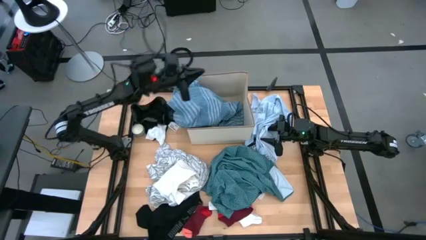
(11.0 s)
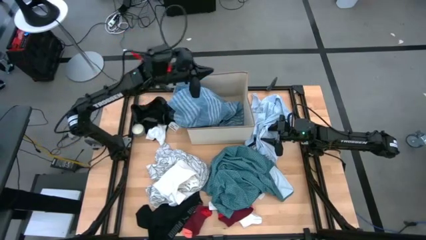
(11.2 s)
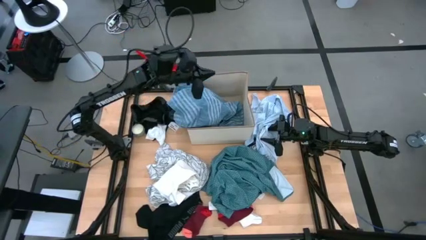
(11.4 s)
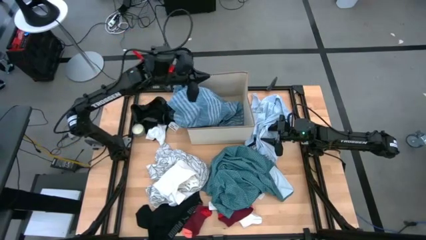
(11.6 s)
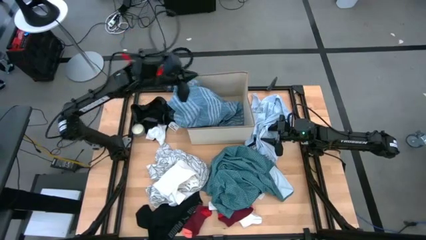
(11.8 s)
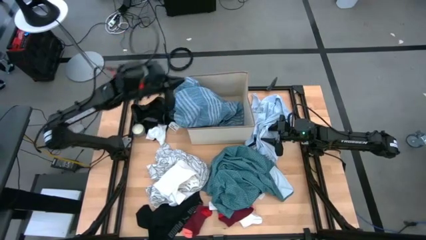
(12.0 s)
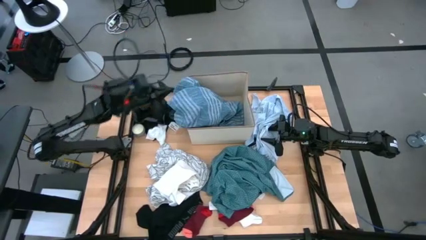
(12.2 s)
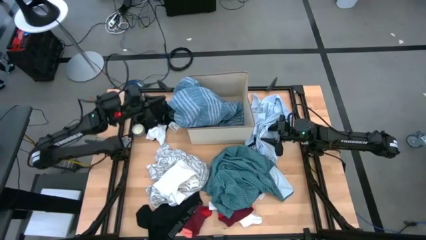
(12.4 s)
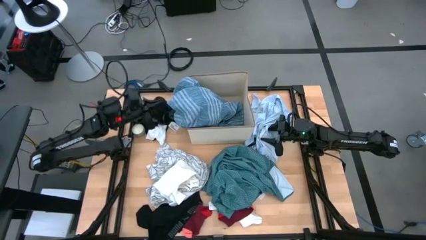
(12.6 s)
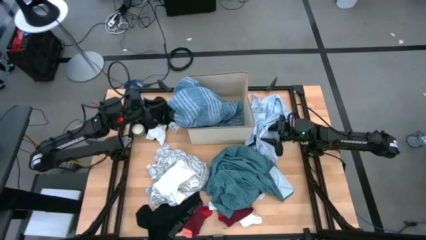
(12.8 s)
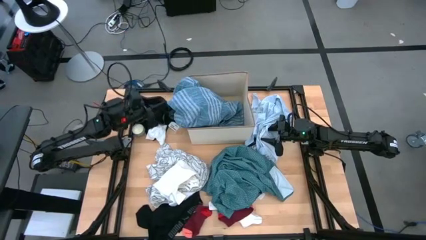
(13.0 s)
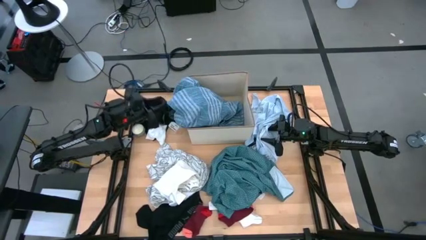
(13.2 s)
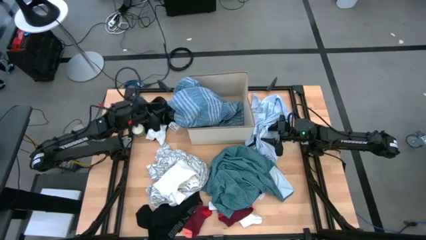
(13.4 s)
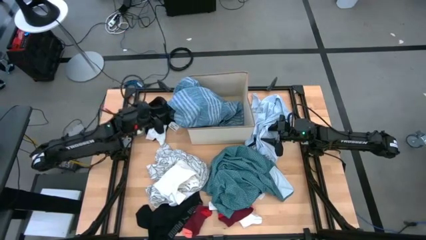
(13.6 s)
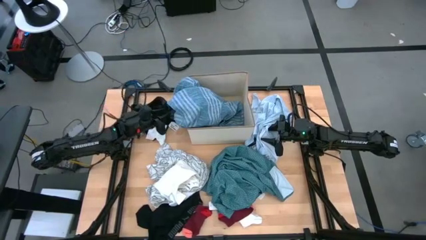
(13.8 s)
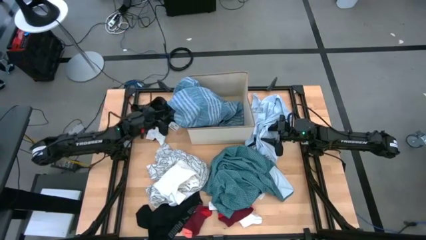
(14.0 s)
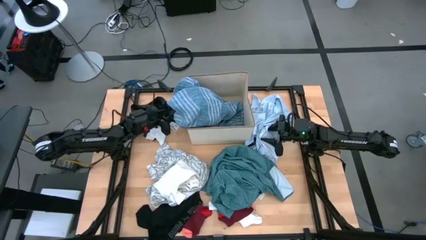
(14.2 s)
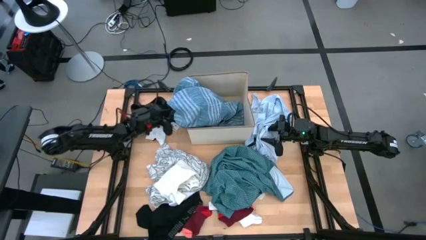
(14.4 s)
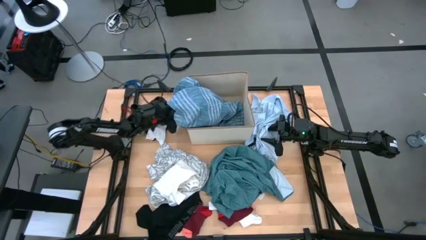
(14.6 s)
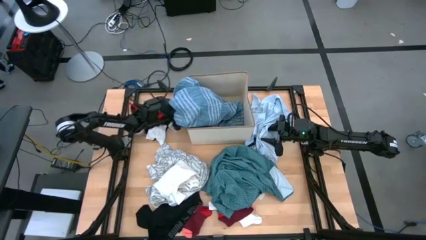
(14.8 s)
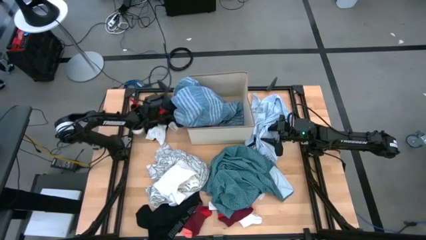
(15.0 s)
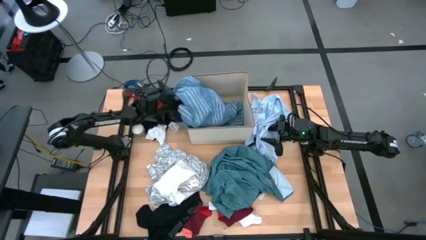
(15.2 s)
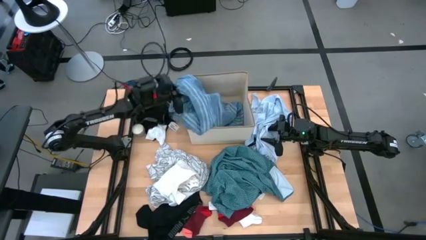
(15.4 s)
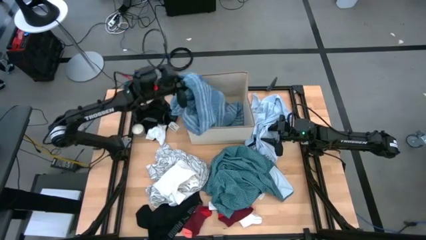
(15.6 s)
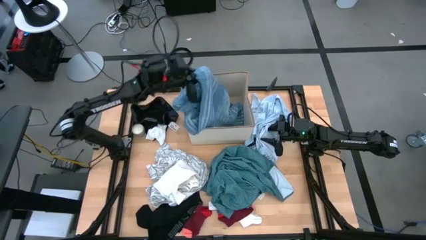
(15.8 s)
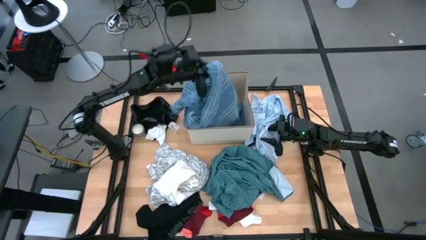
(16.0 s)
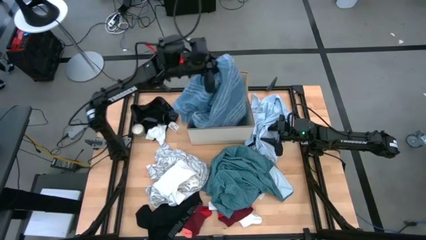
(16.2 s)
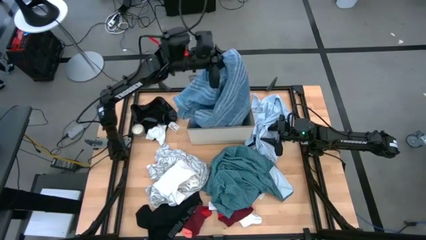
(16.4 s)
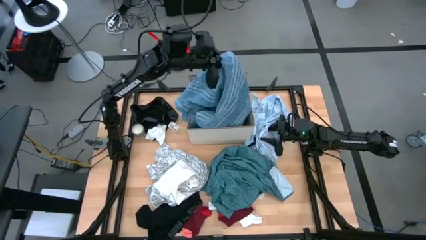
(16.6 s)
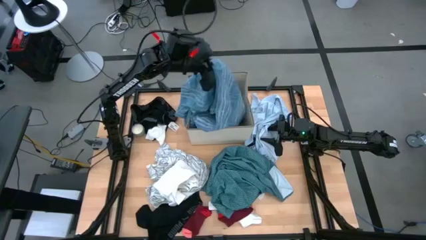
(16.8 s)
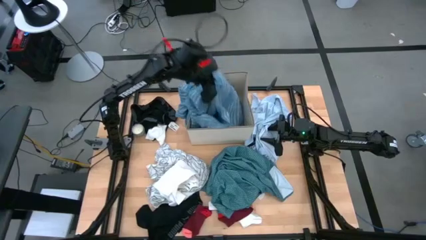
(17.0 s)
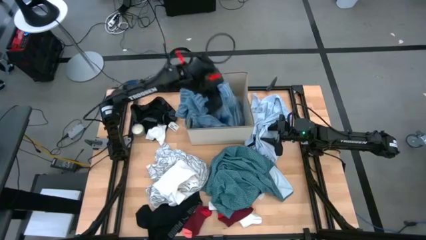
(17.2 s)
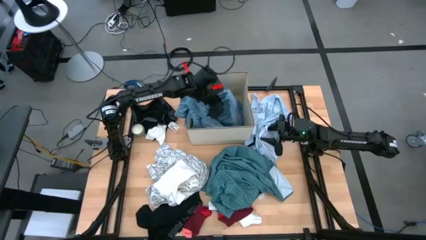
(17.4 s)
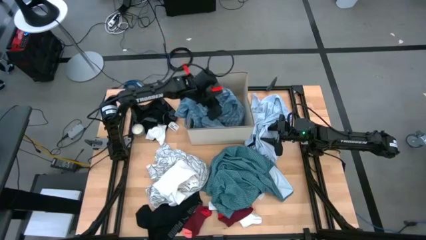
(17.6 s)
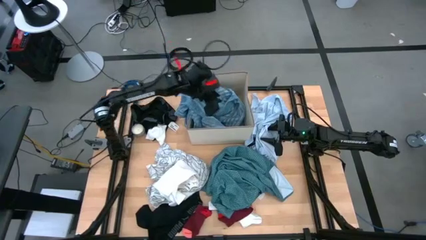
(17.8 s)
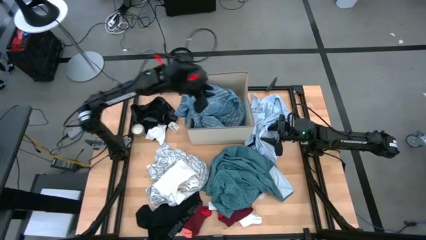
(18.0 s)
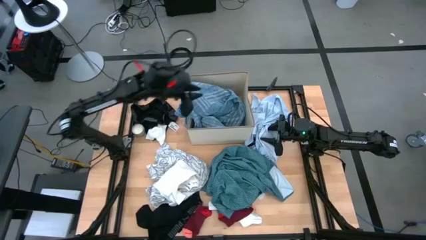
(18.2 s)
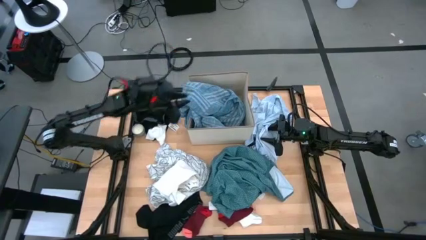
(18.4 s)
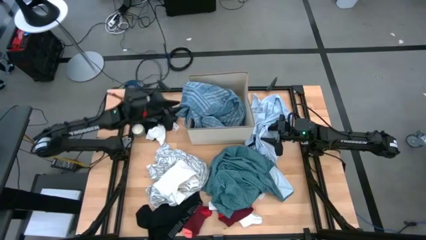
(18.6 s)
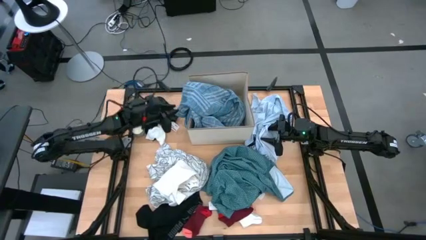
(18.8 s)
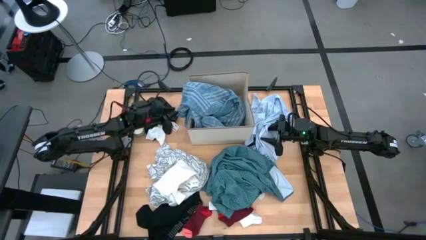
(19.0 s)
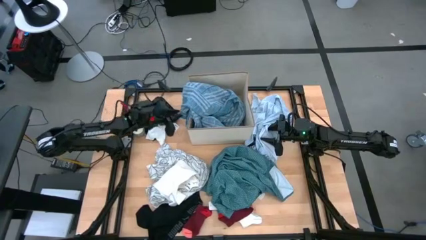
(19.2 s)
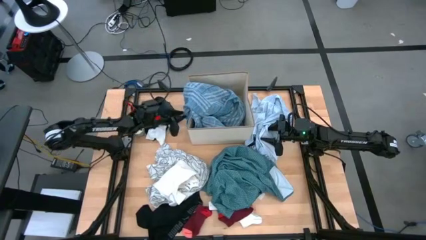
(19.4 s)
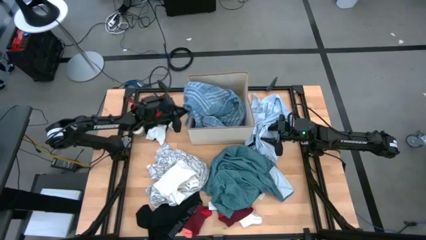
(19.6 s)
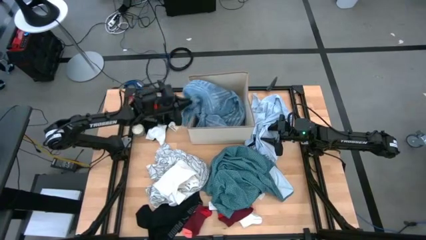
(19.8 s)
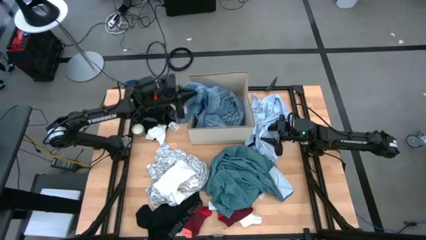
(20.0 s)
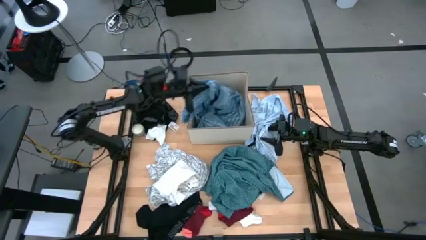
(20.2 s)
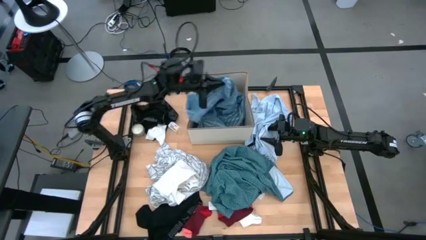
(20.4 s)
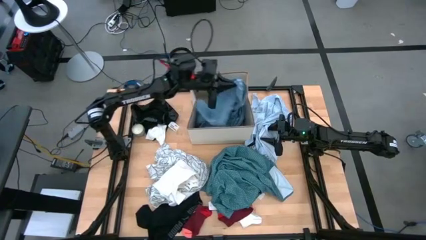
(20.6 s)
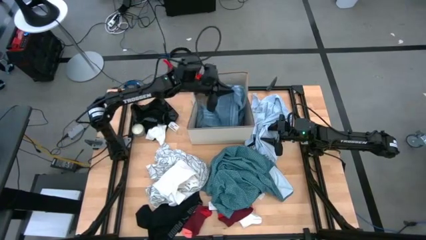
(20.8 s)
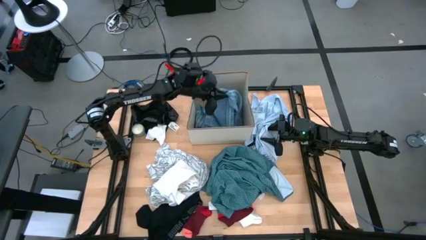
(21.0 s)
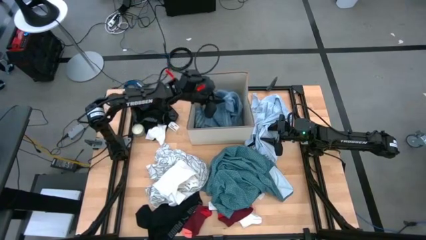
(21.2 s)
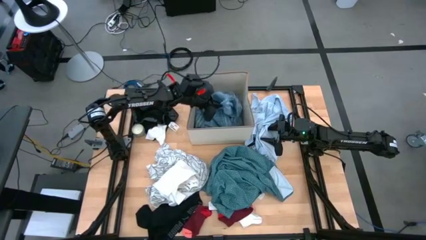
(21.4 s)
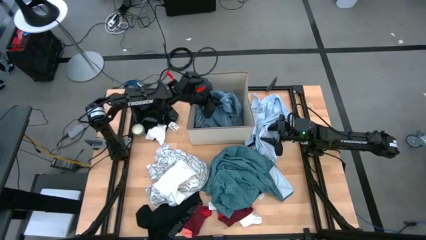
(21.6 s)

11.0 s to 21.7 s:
Task: Sort clothes
Put the dark blue shirt into the laundry organizer

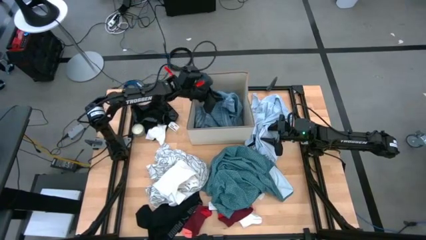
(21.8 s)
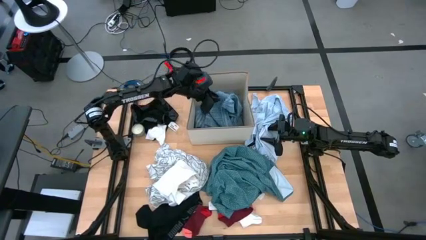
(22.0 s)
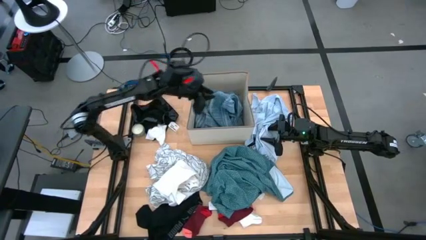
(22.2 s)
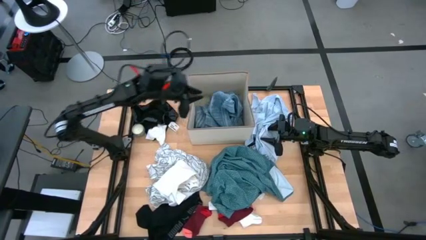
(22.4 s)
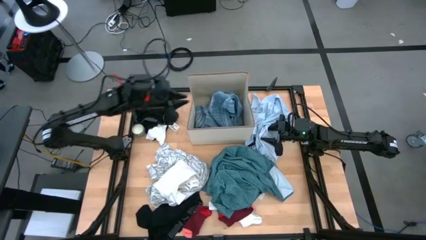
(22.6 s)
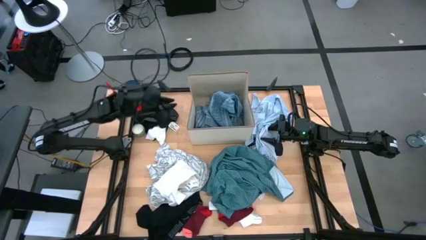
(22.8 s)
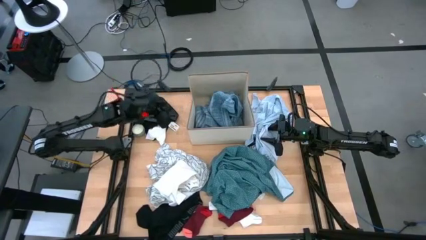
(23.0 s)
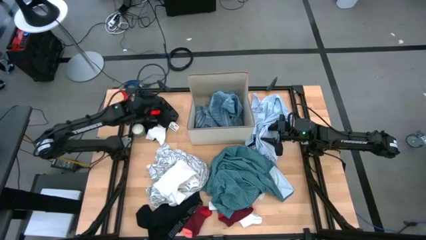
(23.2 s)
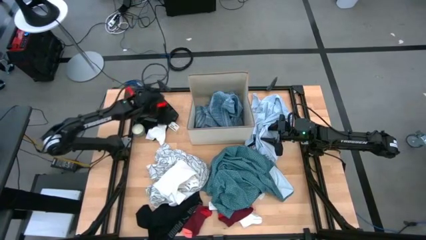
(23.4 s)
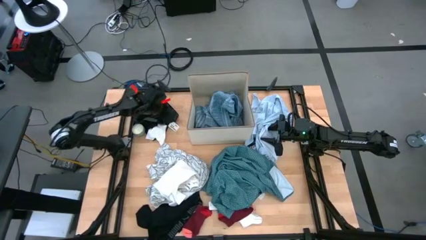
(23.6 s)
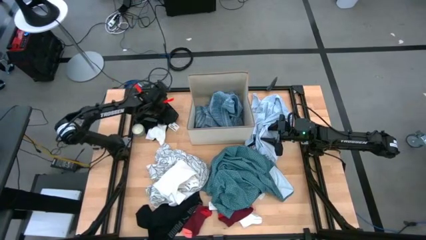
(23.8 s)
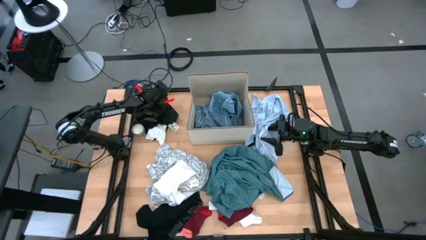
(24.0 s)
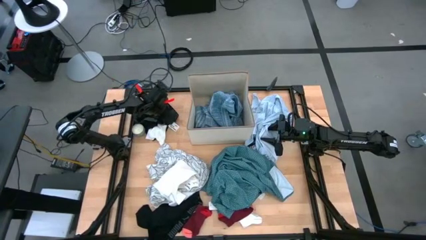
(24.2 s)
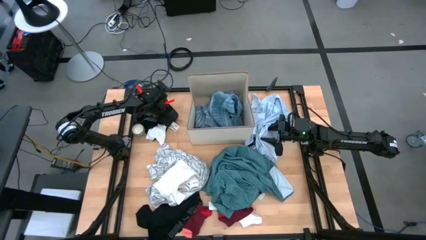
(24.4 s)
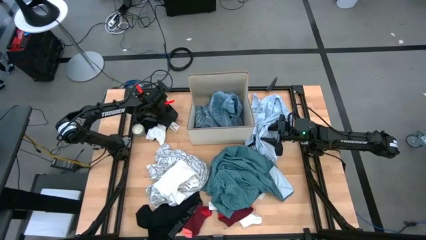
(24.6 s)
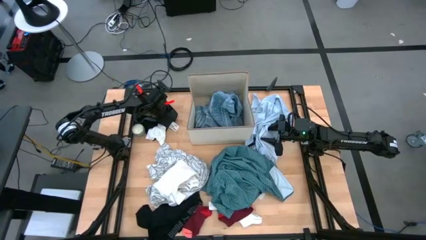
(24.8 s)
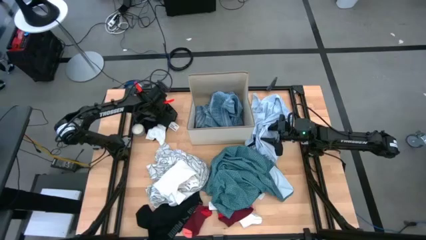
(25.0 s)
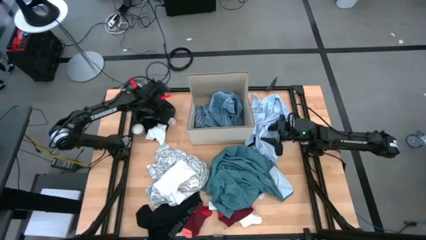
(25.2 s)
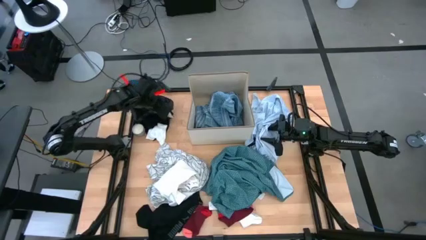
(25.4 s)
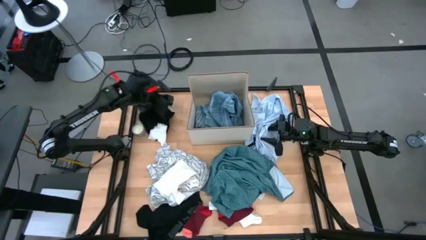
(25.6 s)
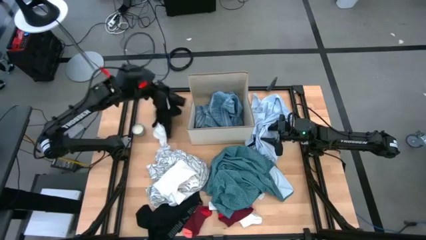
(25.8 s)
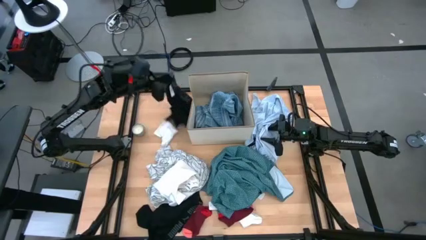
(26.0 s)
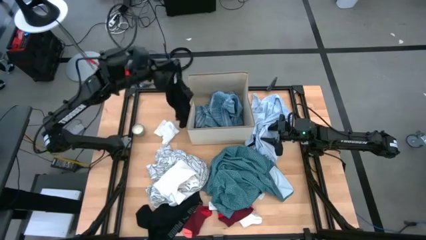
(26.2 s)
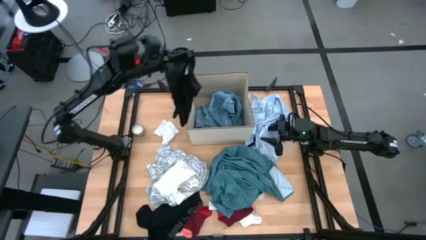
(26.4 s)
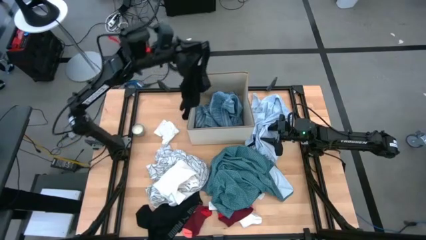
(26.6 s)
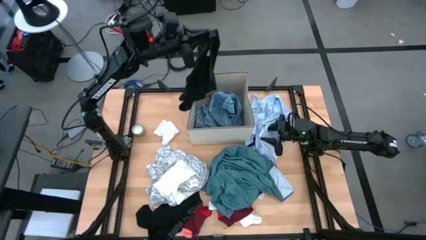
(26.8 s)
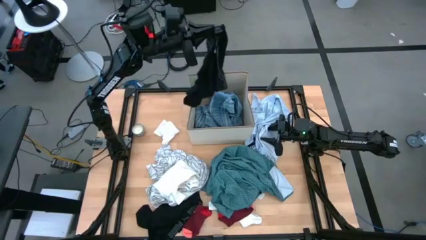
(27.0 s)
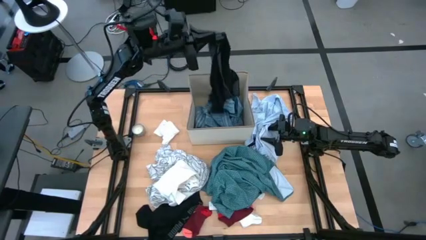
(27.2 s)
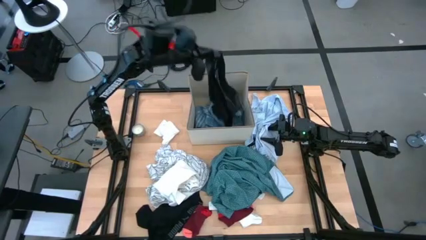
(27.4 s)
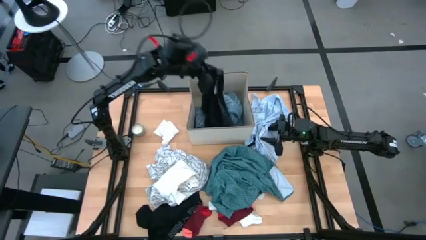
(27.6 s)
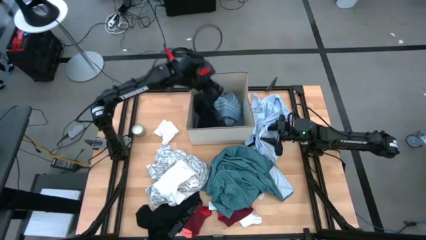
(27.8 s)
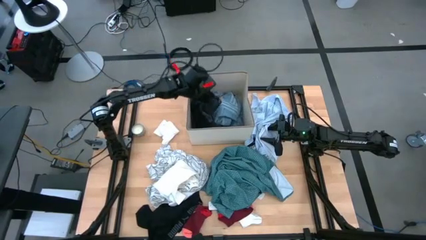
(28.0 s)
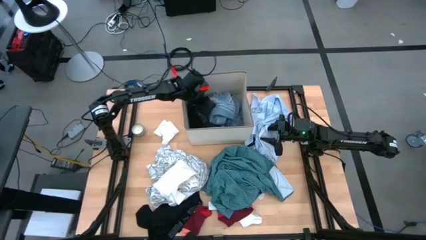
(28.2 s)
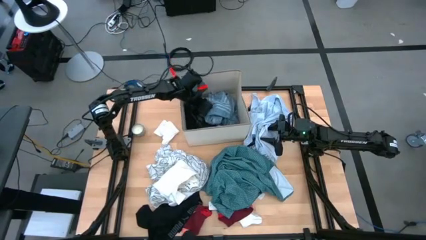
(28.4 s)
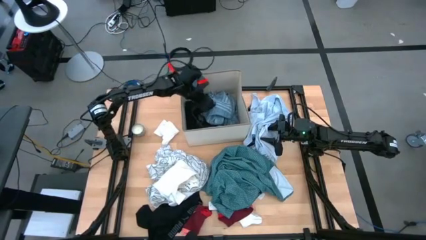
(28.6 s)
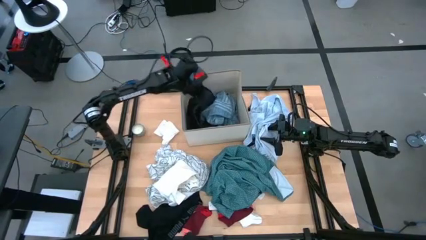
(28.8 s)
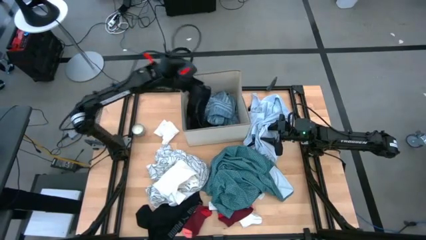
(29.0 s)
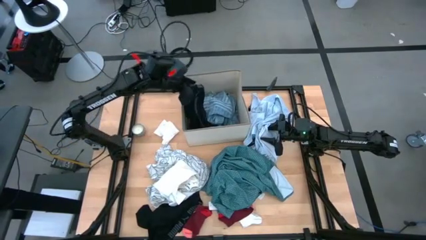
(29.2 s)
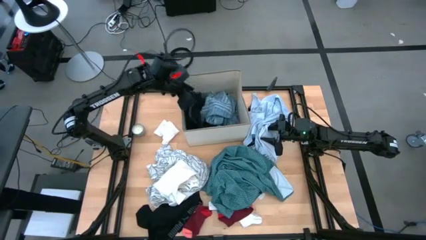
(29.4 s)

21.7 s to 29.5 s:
Put the black boxer into the laundry organizer
